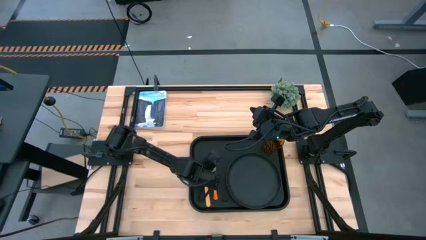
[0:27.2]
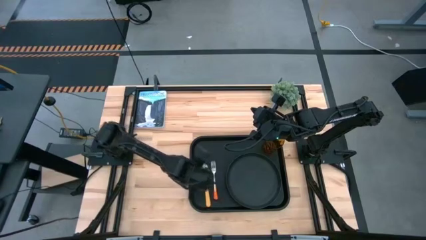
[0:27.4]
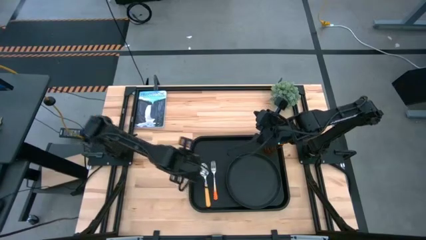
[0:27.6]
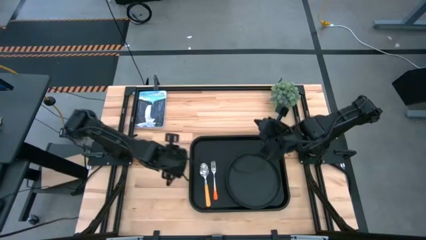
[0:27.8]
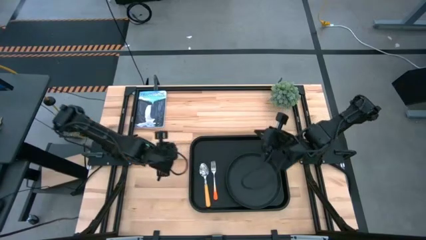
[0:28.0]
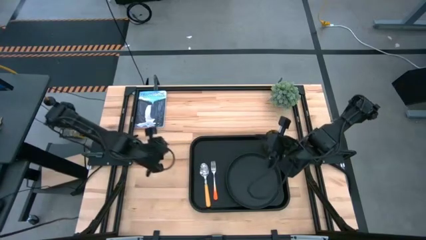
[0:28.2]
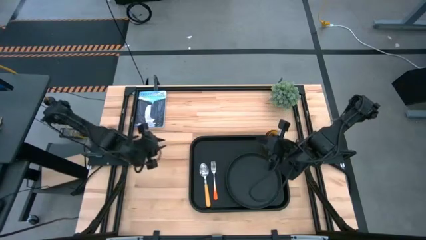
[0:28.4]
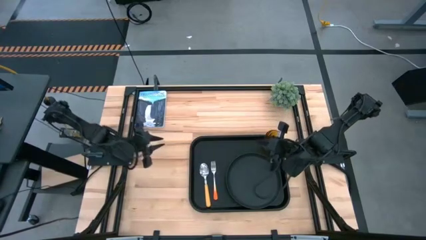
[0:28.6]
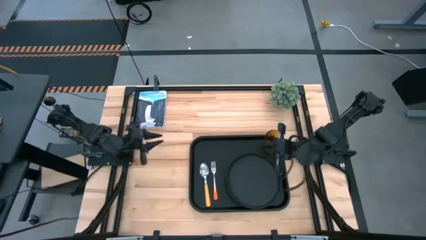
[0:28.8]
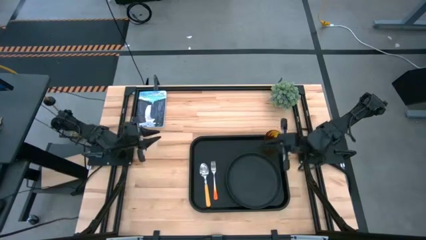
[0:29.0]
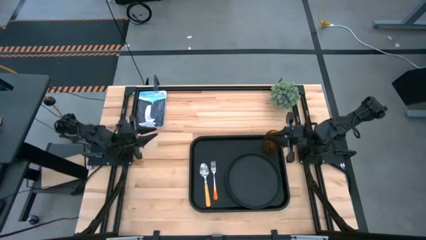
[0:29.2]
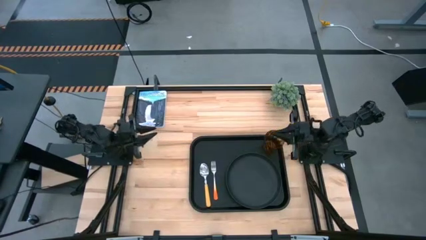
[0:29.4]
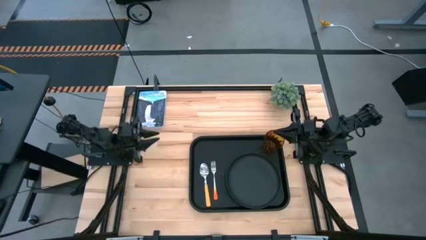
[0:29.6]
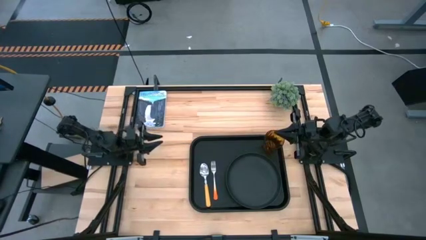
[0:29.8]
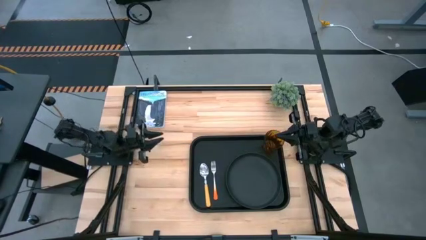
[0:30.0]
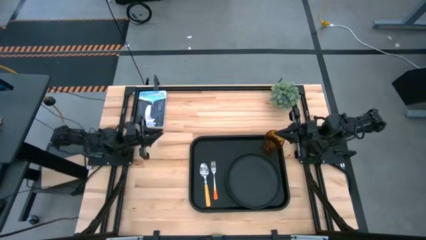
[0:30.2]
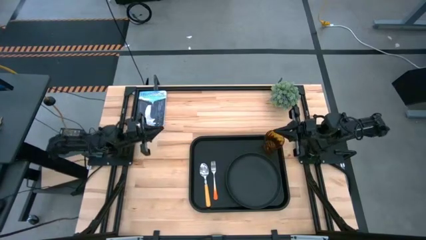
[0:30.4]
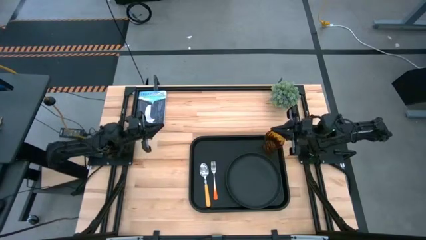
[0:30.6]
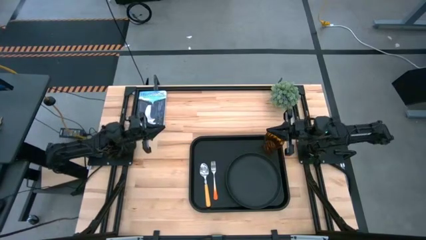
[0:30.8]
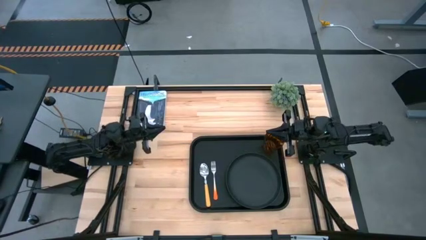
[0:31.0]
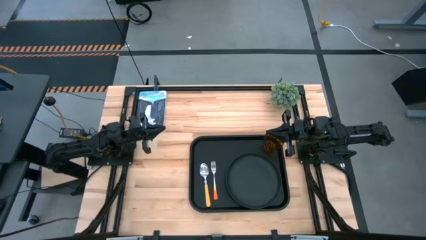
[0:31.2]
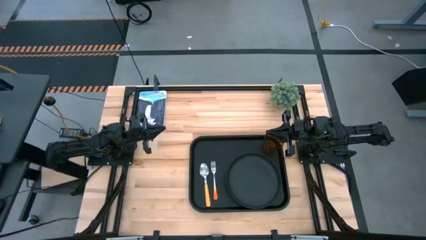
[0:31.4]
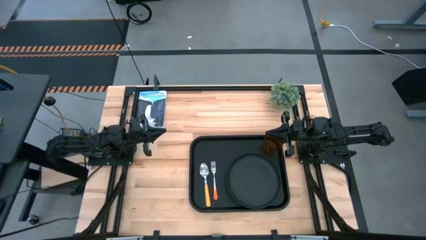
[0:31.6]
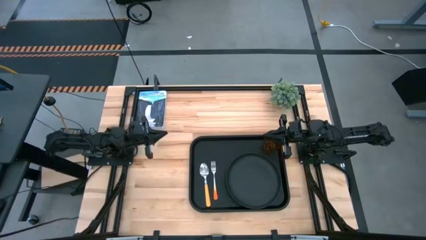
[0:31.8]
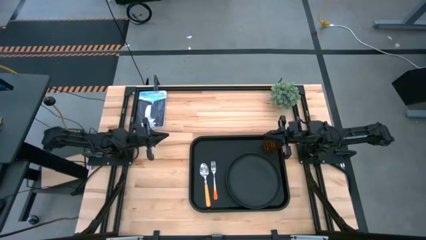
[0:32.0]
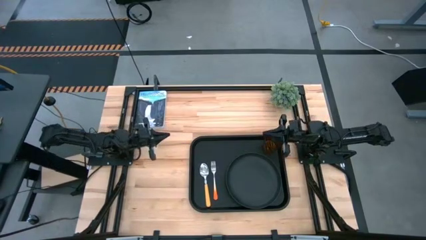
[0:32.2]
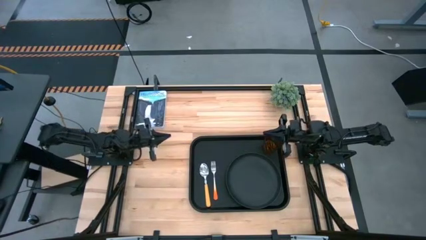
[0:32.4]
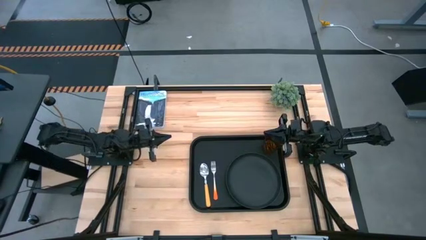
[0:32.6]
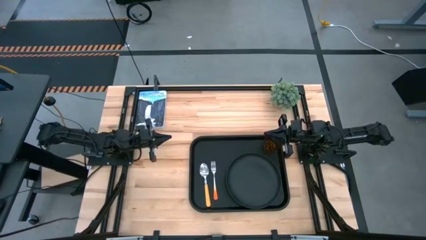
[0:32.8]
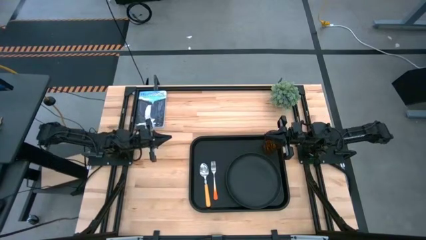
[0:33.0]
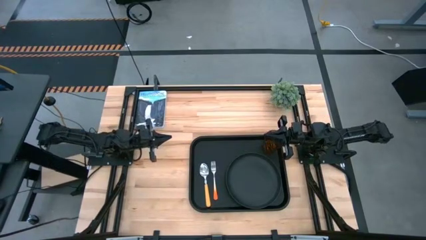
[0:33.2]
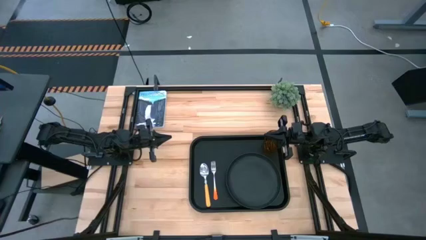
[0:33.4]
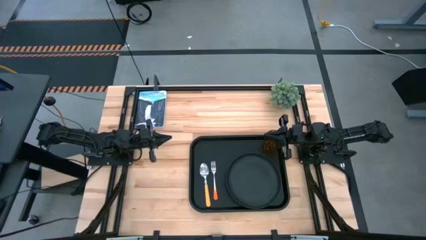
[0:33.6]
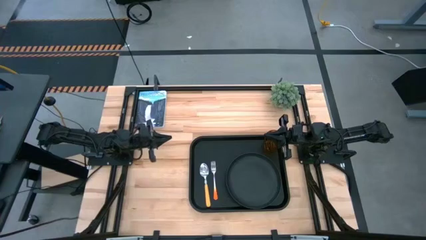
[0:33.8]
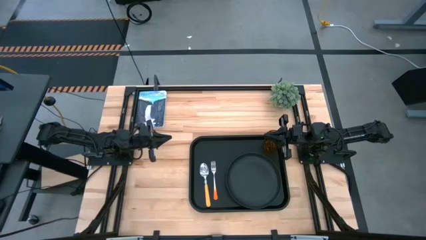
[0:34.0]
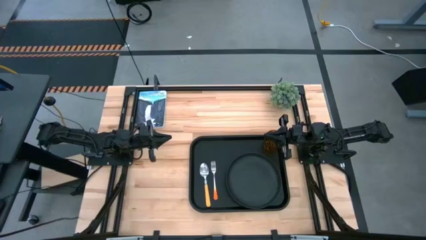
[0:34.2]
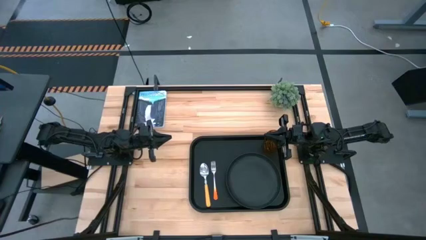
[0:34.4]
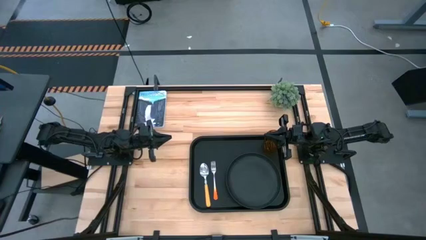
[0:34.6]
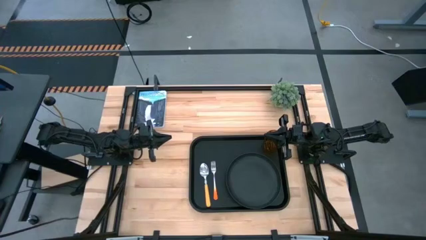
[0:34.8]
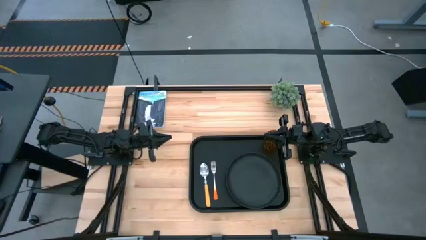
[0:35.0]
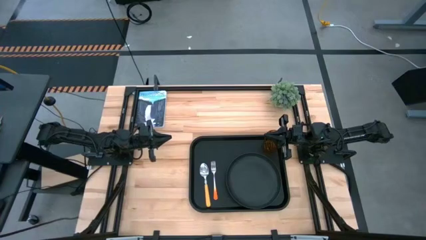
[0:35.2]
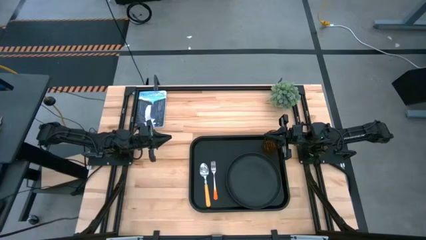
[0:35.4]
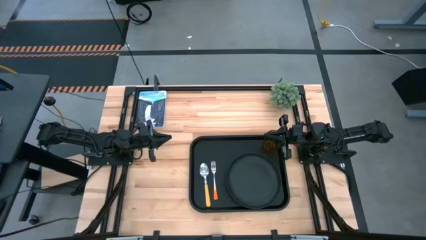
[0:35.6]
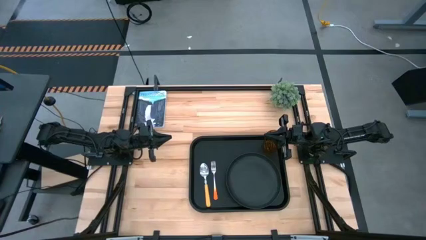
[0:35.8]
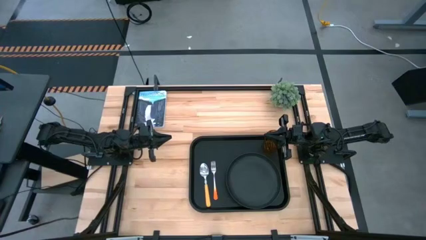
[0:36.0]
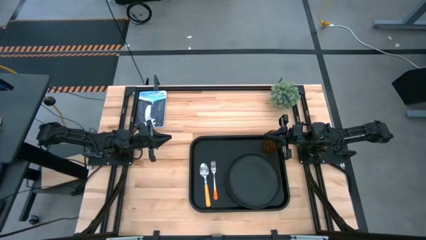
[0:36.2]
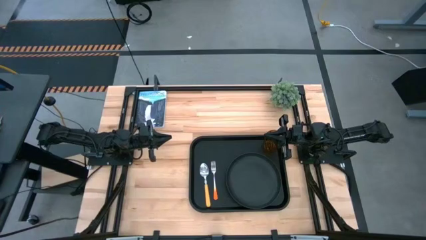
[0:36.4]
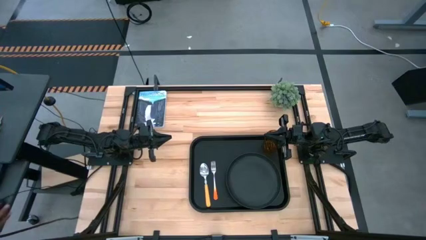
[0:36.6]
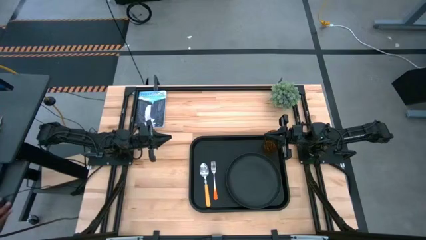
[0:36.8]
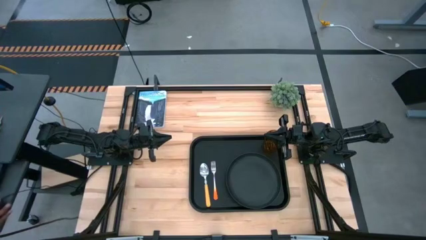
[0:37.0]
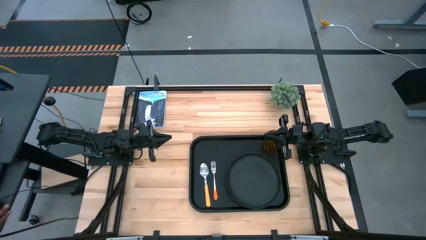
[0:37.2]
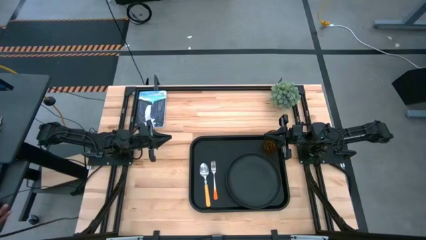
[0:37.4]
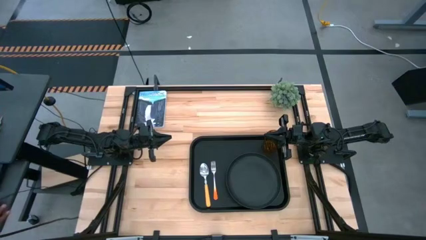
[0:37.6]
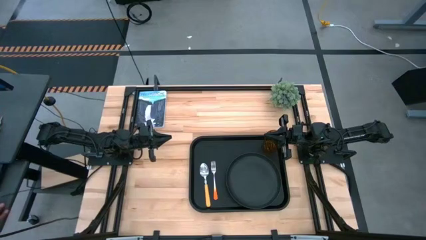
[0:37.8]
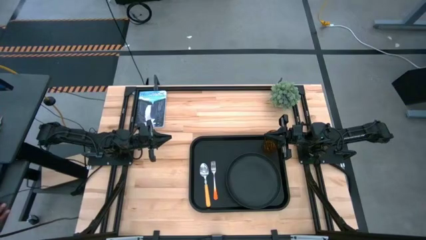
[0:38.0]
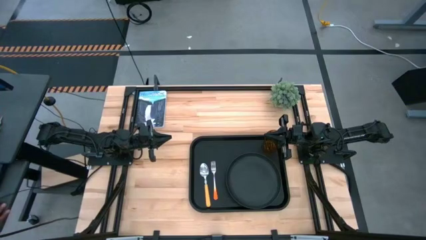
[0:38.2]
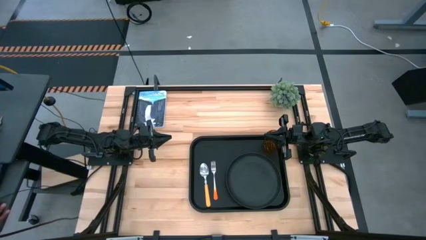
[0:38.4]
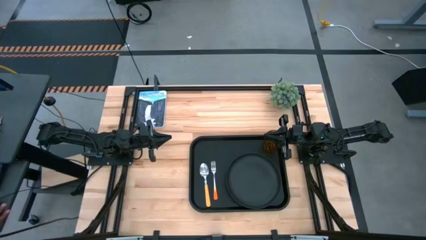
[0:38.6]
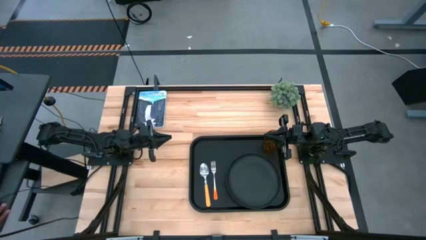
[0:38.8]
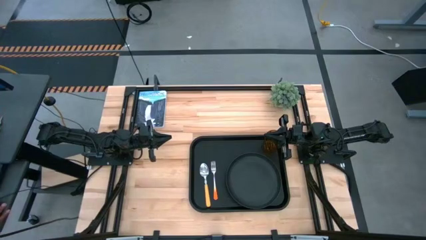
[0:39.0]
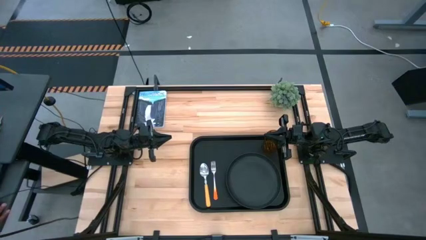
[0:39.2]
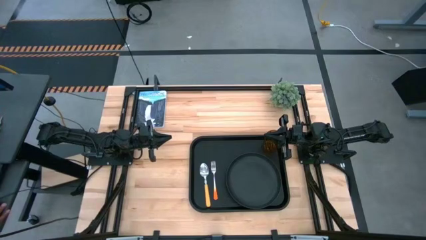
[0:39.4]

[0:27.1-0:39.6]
Task: Pick and place plate/cup/fork/spoon on tray
Return to Home Position

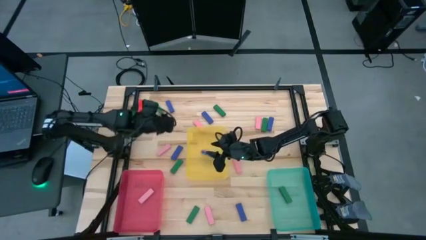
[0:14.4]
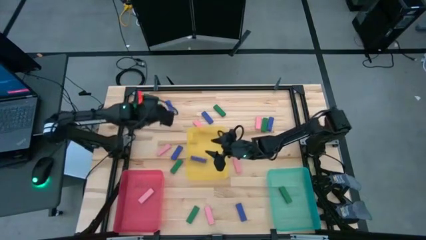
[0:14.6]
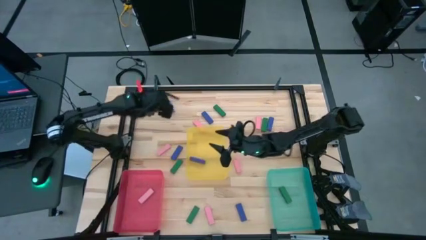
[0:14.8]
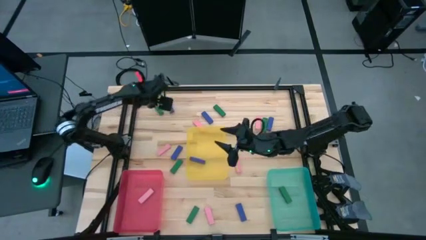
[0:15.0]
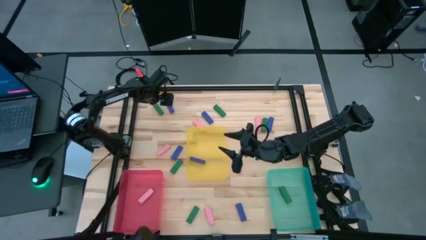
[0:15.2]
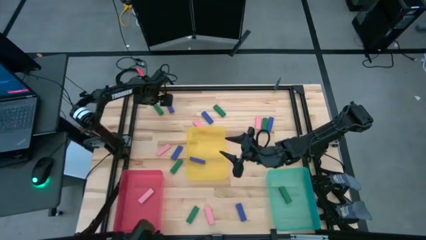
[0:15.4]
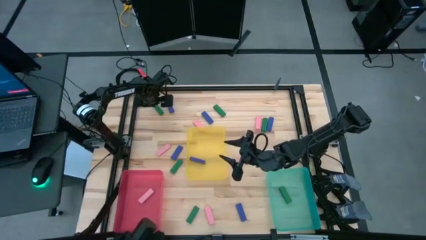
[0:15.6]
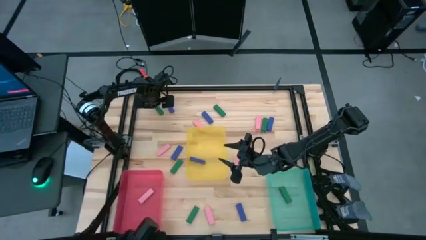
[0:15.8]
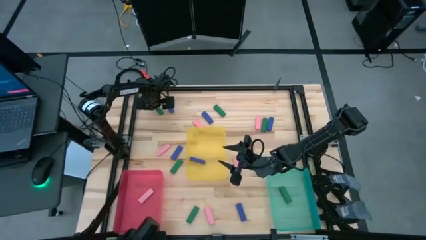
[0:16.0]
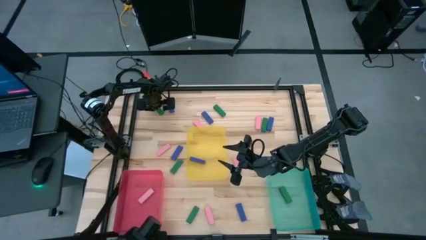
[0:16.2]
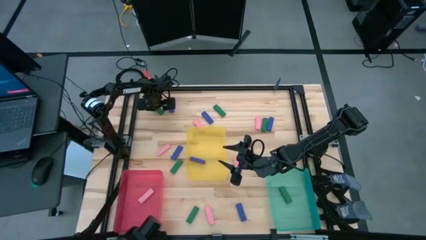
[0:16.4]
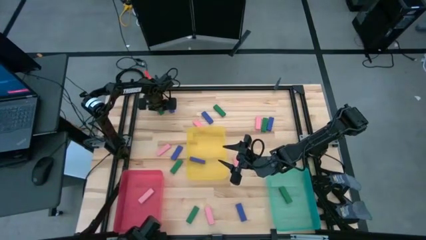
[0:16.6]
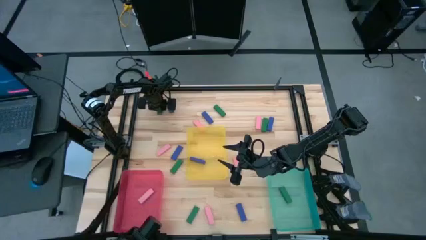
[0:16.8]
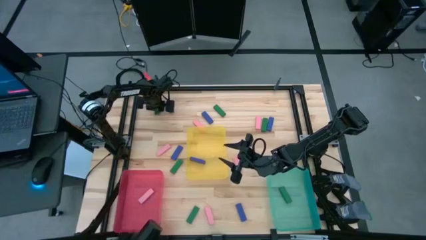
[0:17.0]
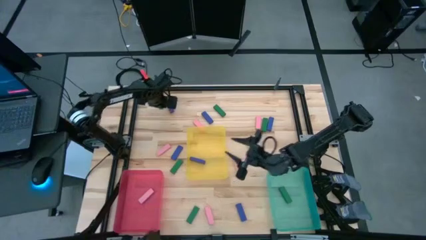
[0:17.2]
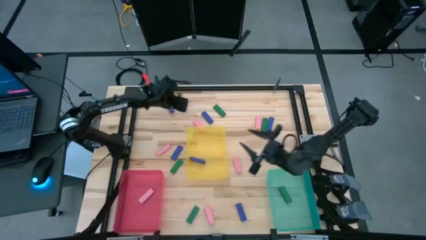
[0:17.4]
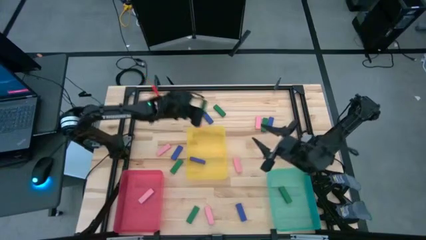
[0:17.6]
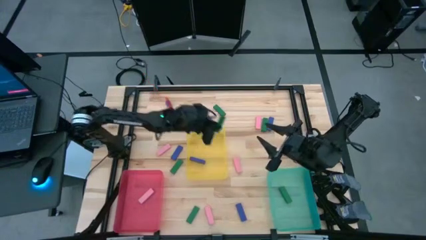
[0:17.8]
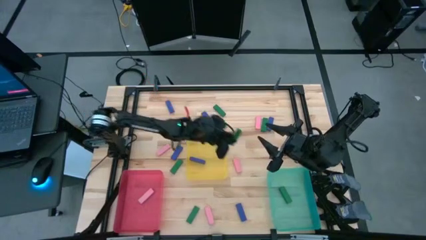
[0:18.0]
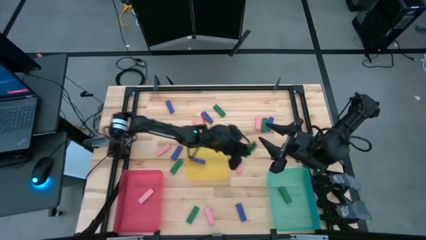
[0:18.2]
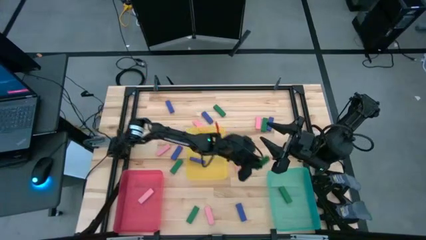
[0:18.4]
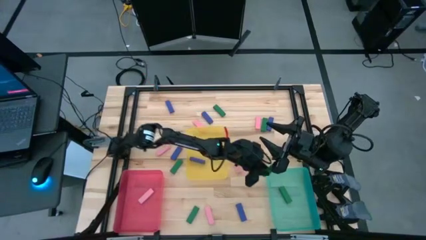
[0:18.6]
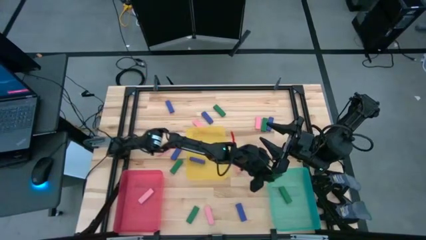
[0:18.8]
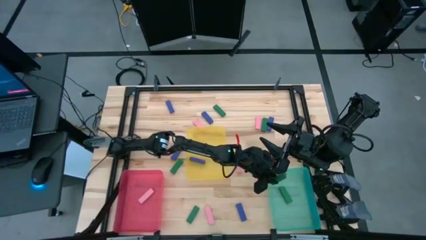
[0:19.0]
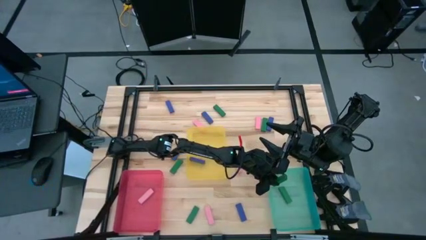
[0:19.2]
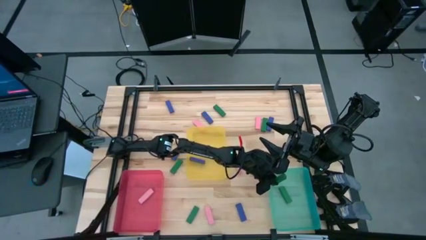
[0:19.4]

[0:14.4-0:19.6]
Task: Sort blocks
Put the green block into the blue bin
